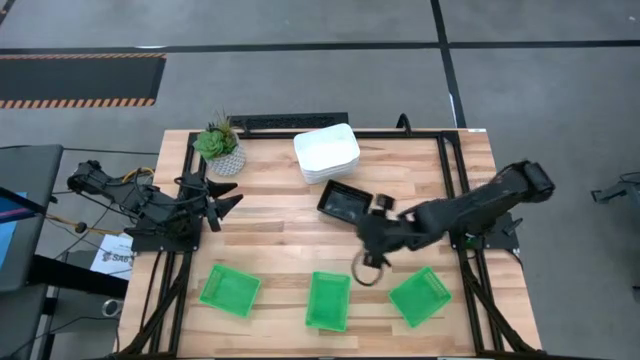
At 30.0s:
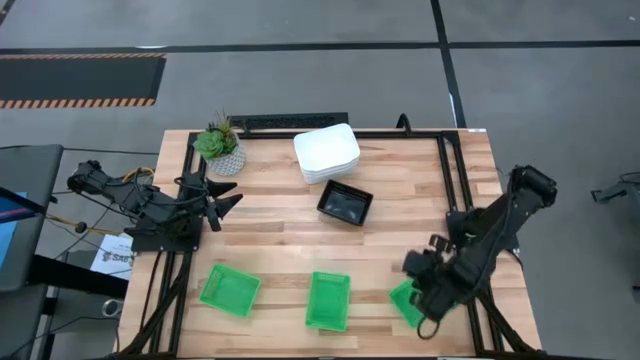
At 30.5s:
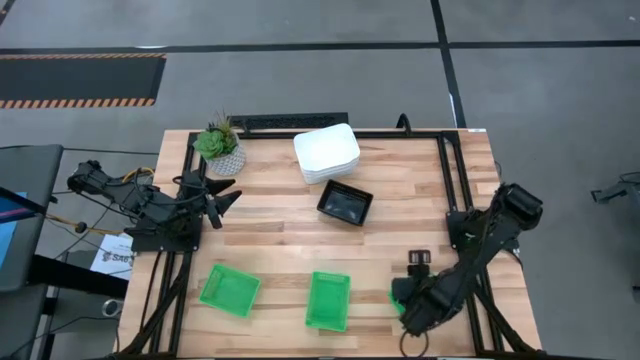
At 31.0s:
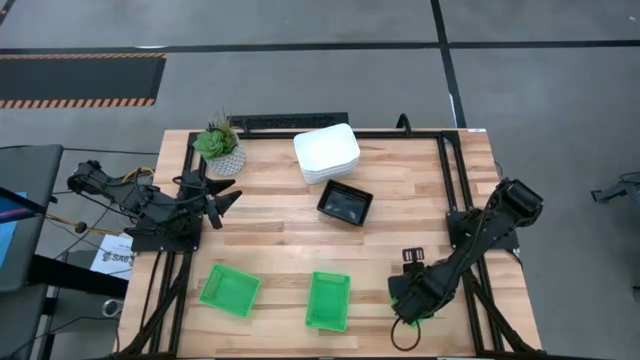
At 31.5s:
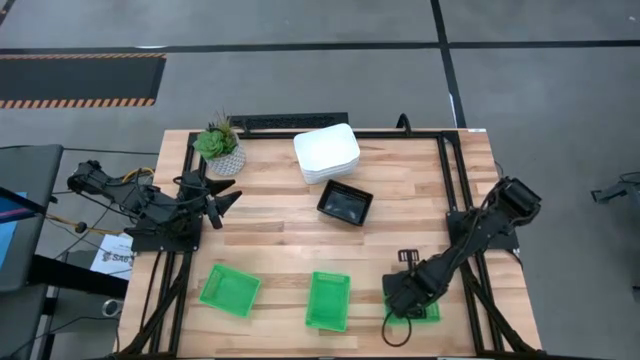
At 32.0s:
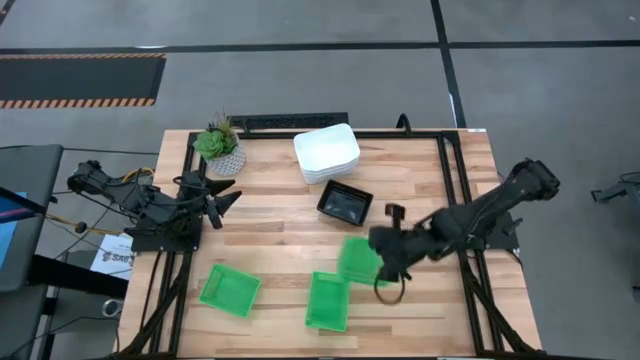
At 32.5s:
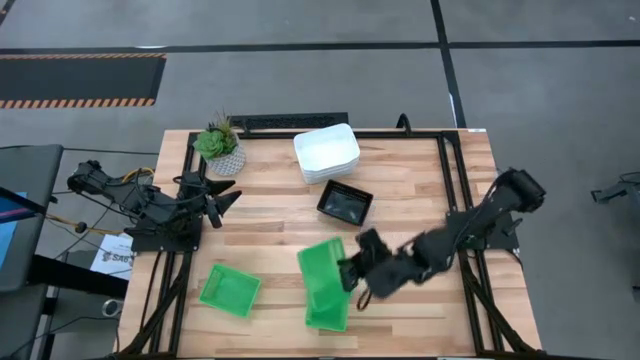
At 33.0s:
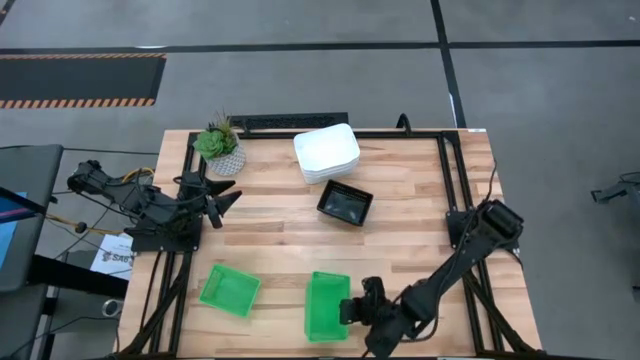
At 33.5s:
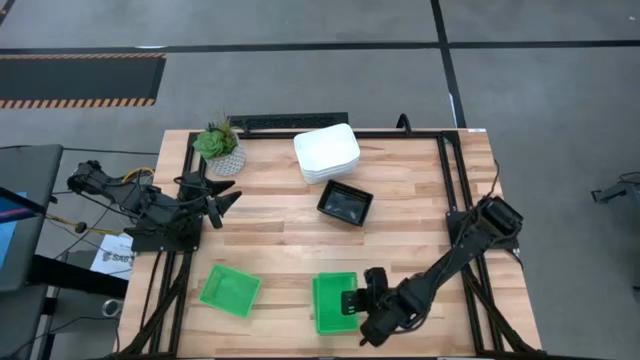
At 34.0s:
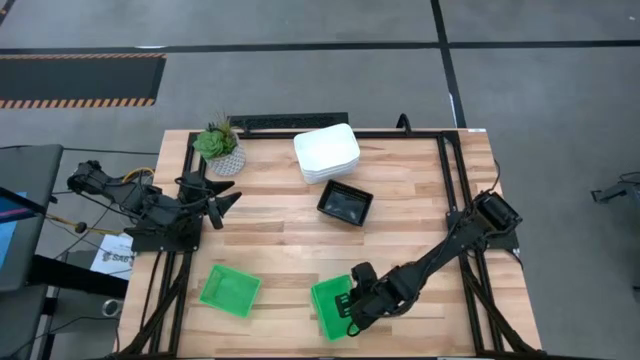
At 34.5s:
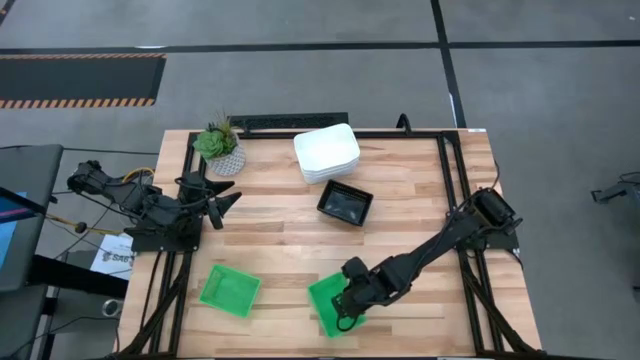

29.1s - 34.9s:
Stack the right green bin on top of the center green bin

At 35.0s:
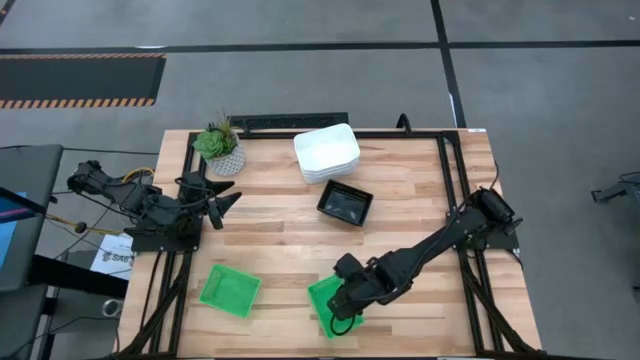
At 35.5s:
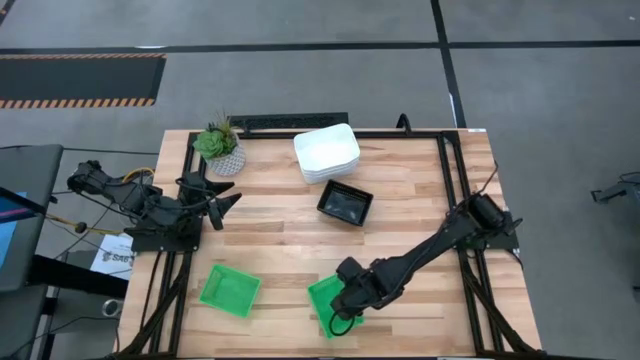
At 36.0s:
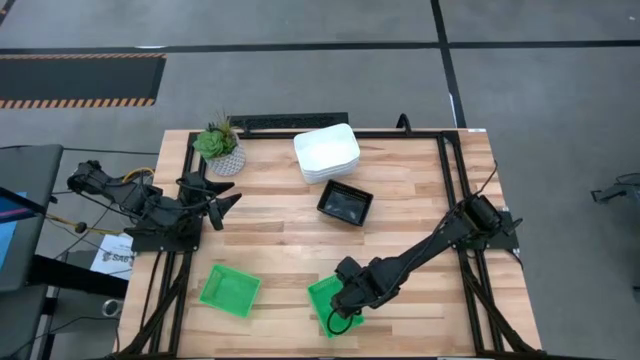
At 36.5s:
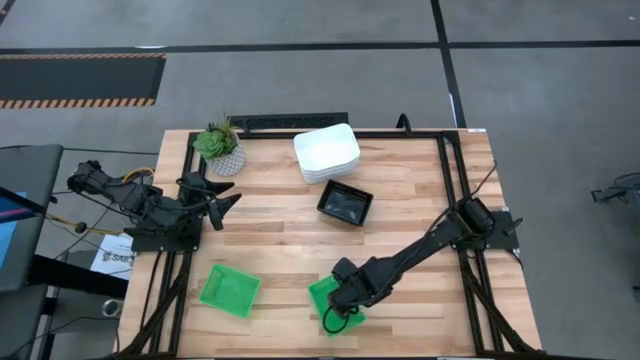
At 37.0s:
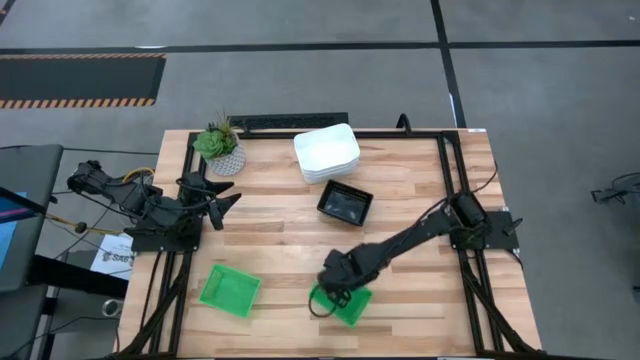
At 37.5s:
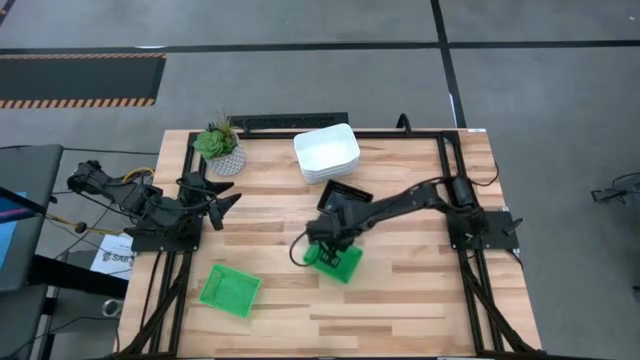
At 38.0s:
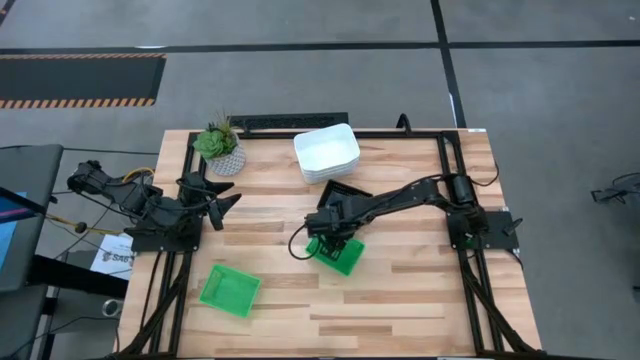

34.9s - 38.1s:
Move the stack of green bins to the center of the table

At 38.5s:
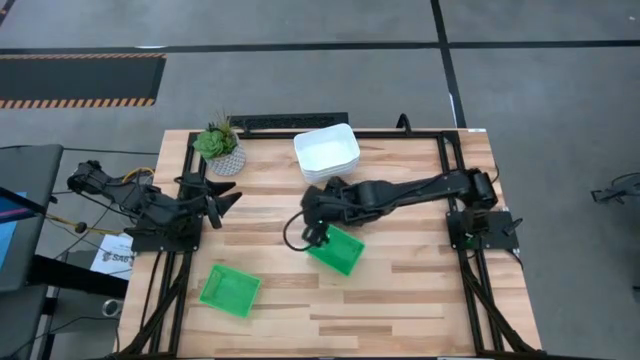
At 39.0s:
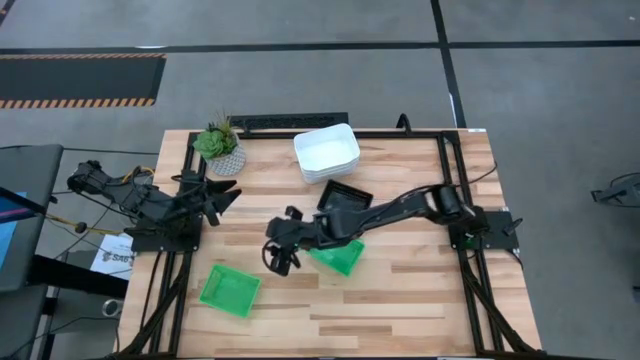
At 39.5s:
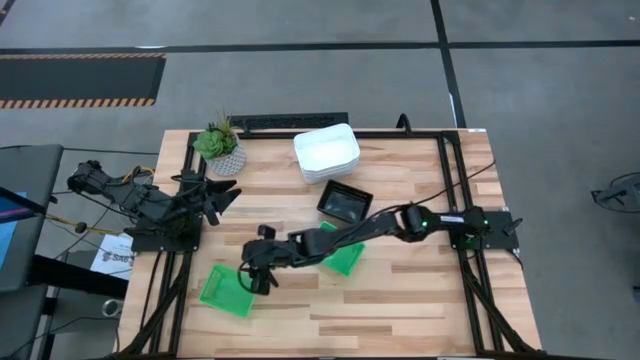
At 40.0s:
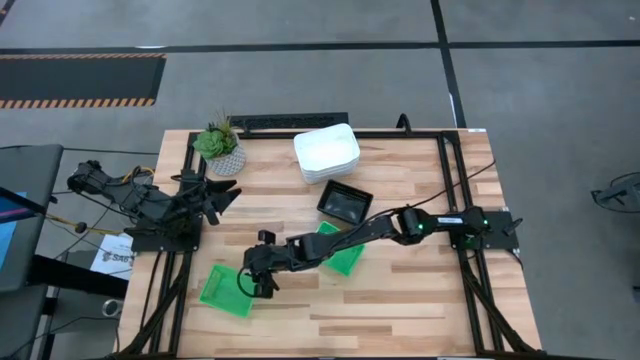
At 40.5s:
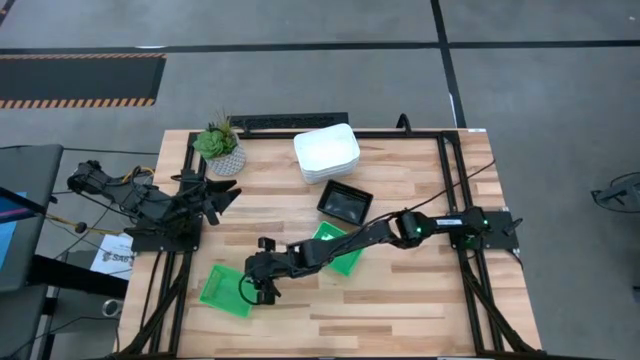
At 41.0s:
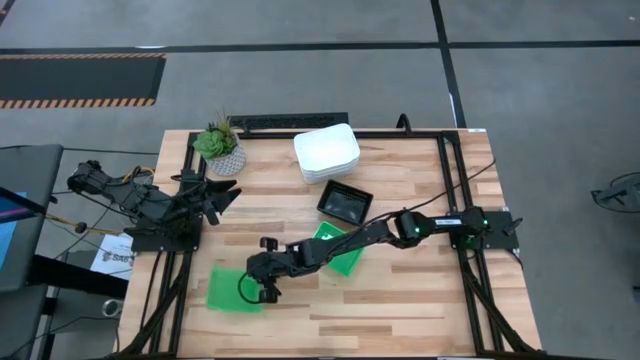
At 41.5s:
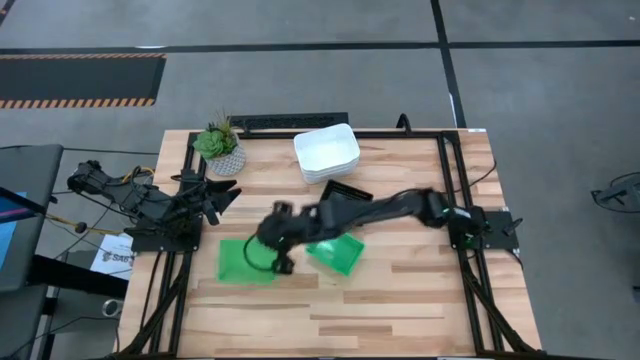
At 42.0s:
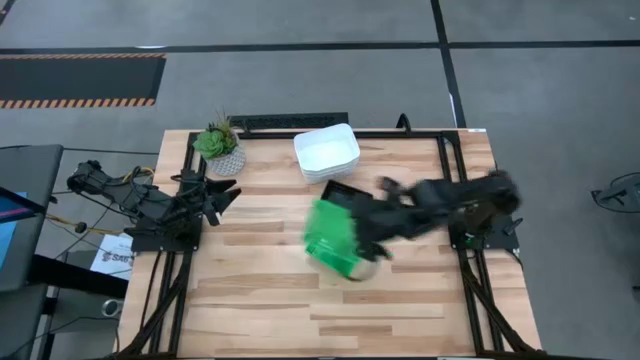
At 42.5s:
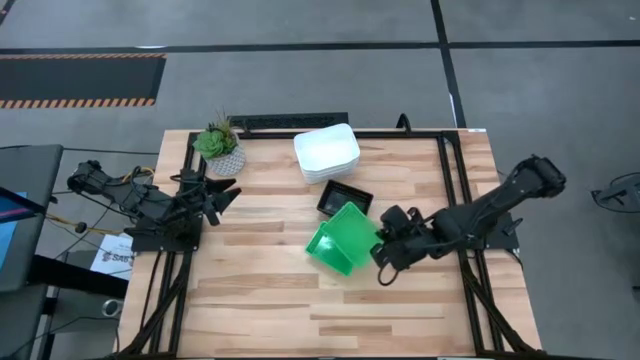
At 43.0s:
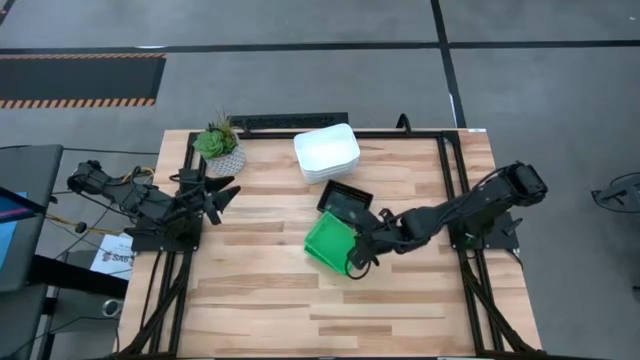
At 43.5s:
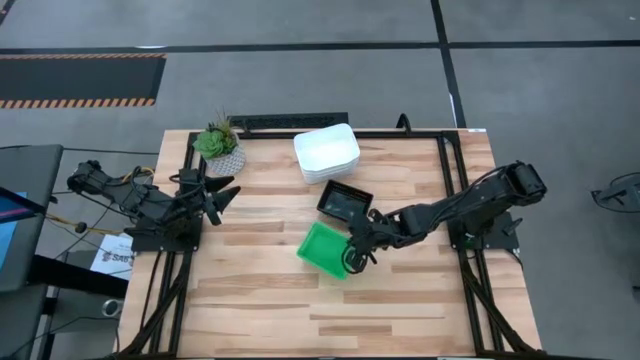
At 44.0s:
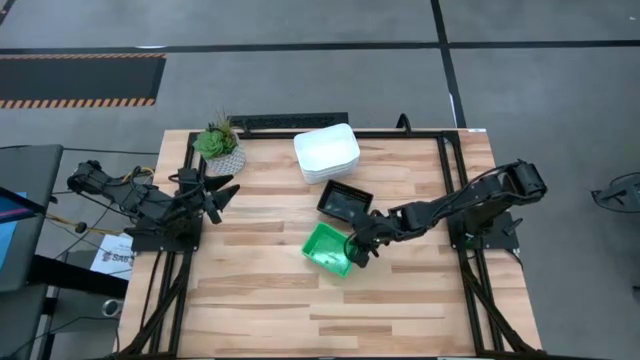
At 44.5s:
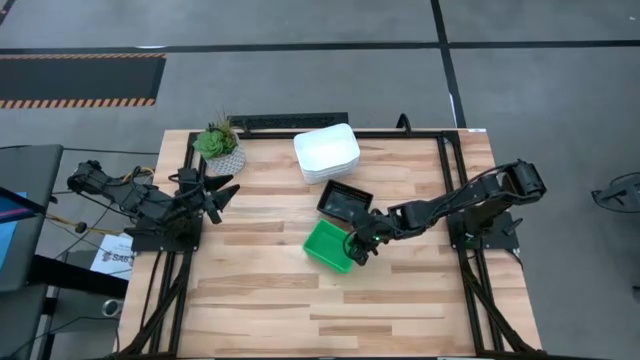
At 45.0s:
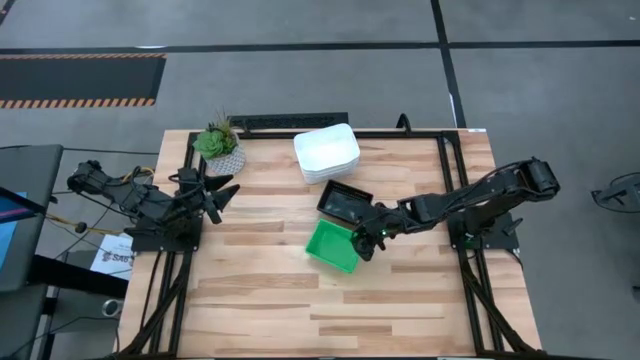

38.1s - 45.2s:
Stack the left green bin on top of the green bin

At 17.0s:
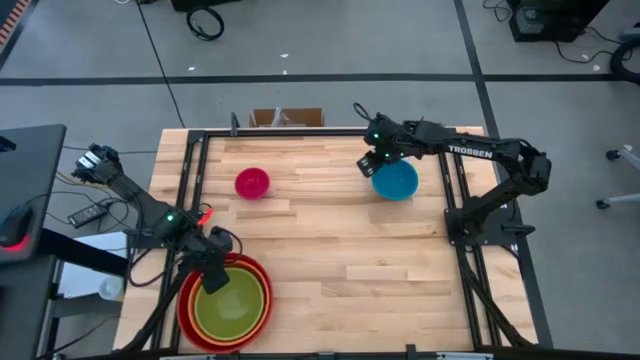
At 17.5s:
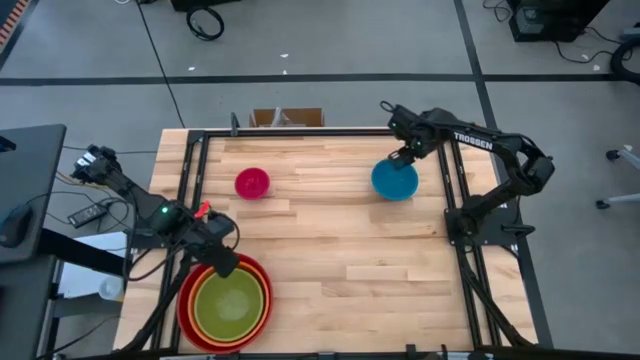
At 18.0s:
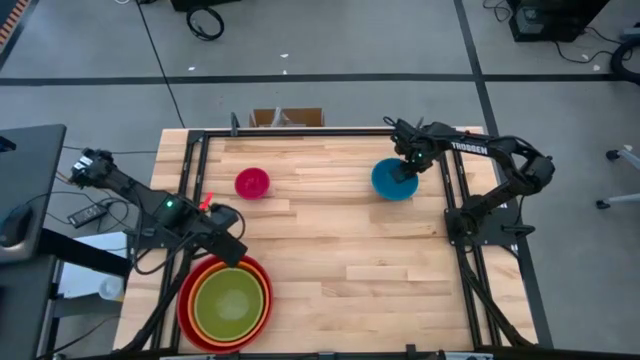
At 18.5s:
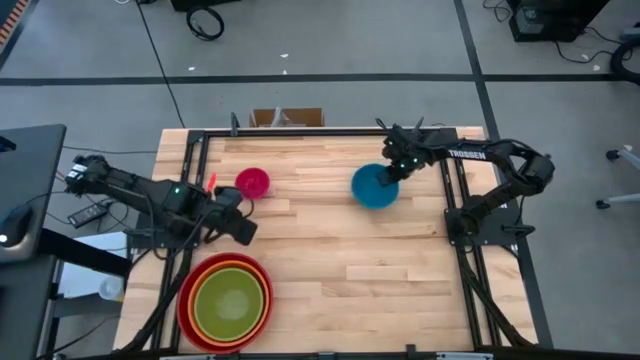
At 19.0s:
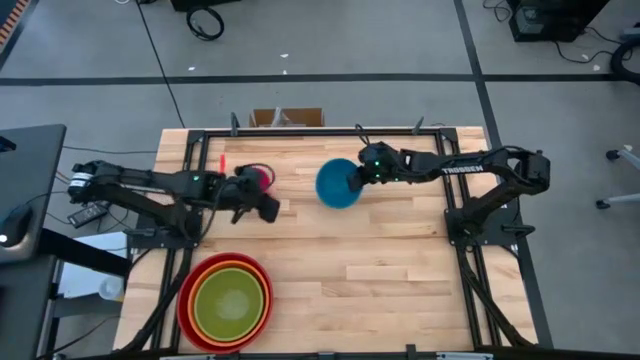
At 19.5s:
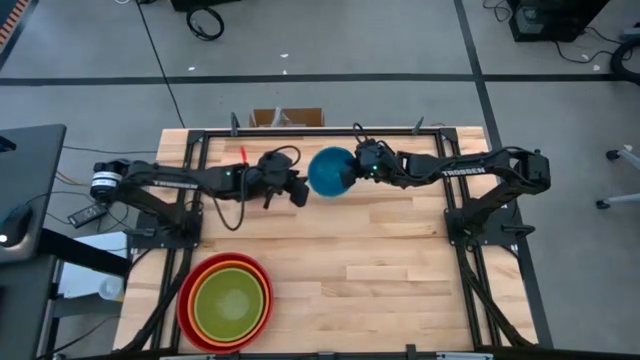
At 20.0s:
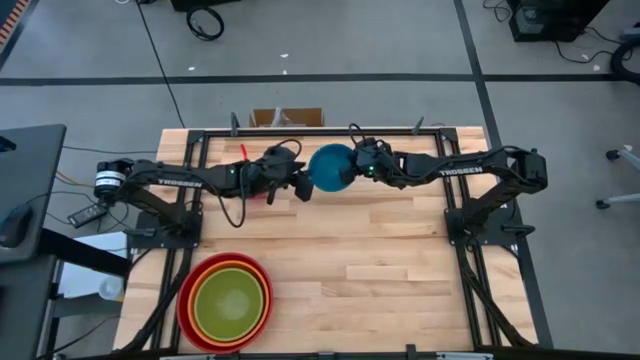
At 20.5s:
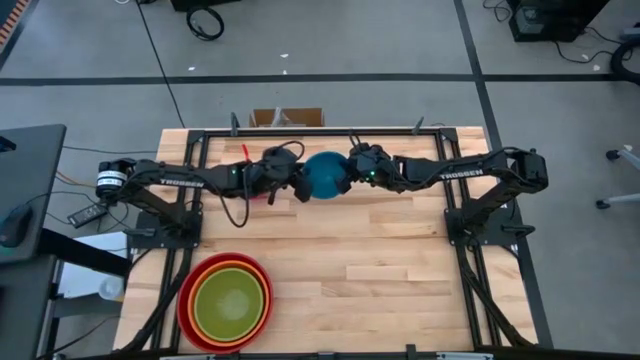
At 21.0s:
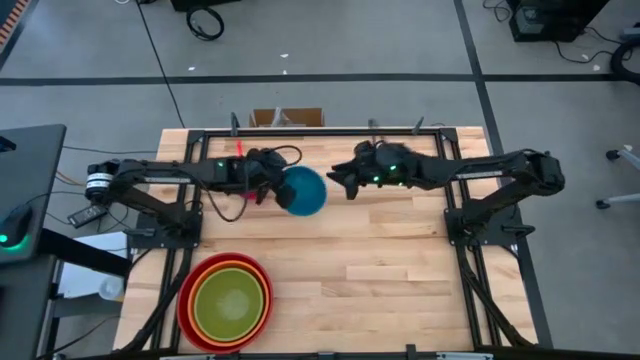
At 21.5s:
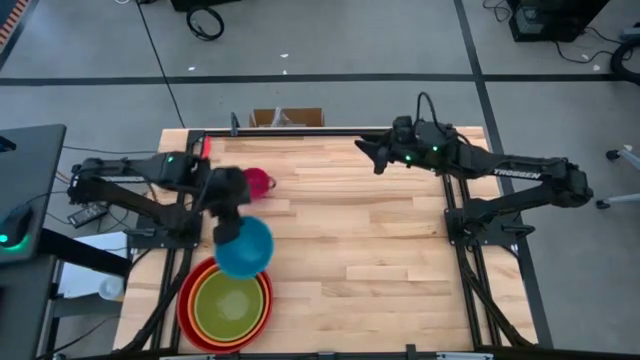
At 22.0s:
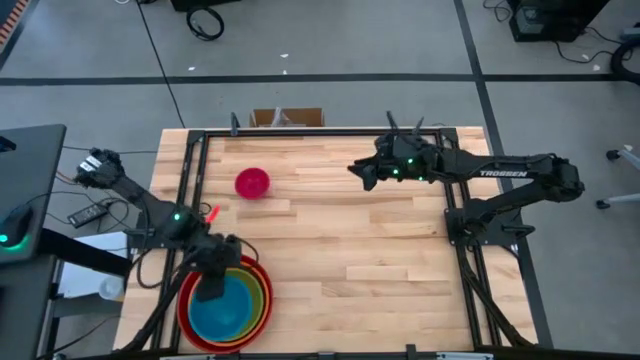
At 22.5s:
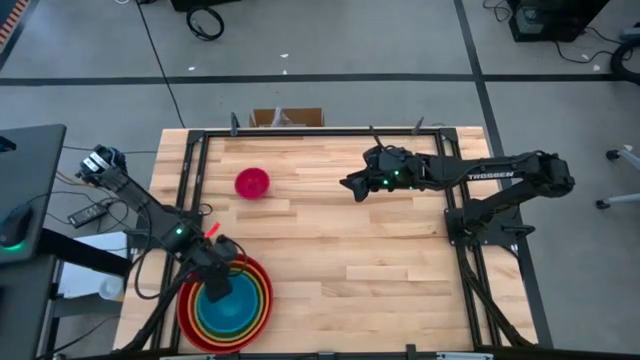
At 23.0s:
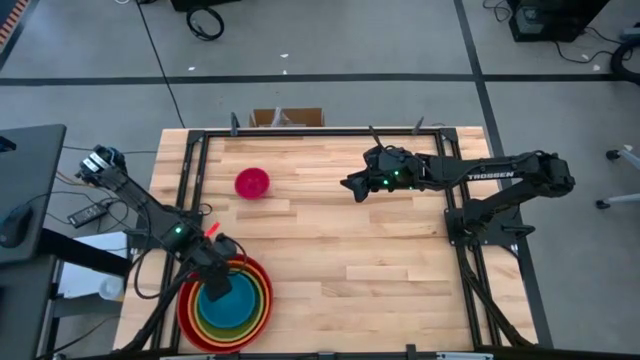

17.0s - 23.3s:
Stack the blue bowl on top of the green bowl
